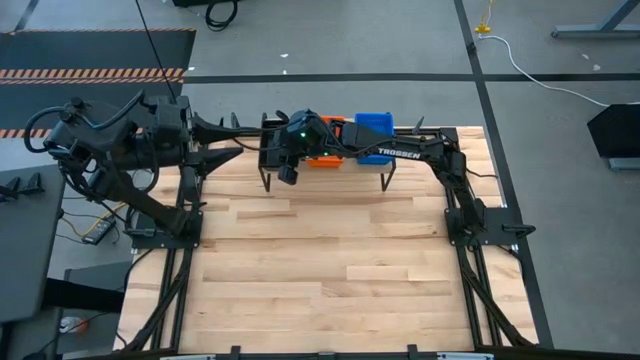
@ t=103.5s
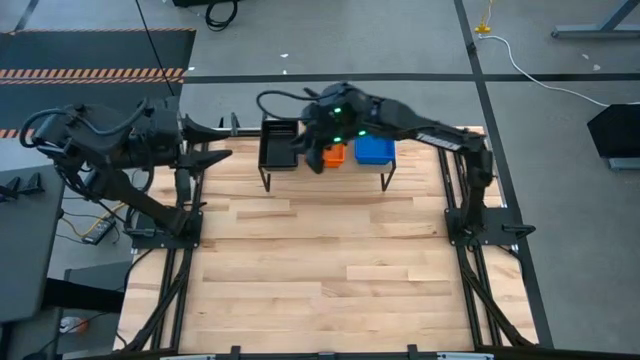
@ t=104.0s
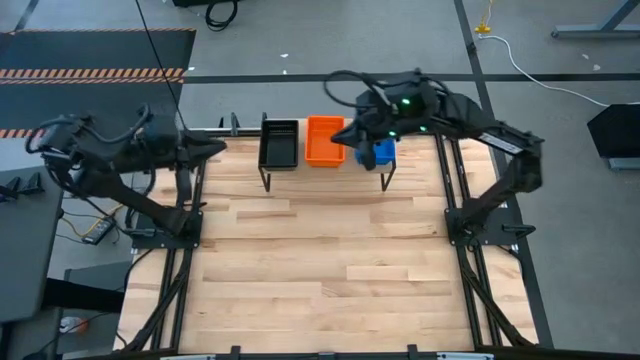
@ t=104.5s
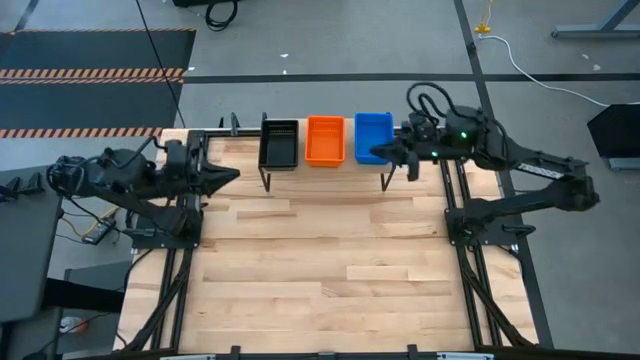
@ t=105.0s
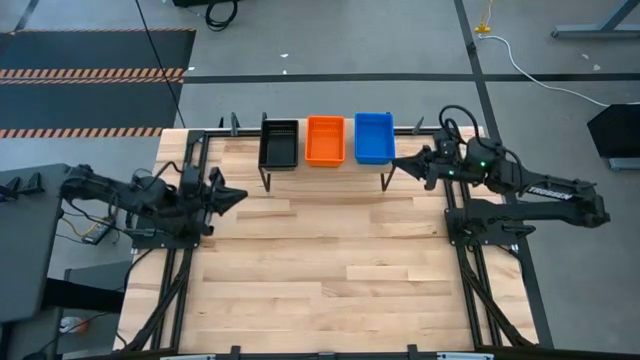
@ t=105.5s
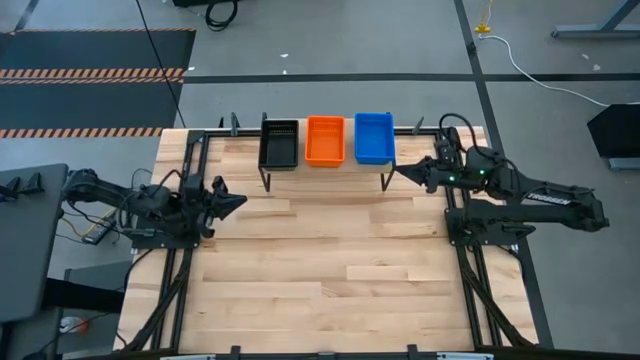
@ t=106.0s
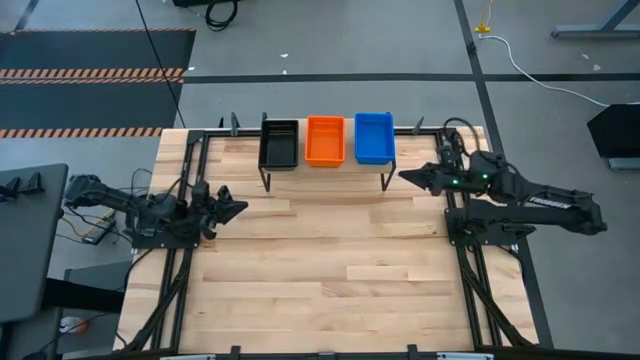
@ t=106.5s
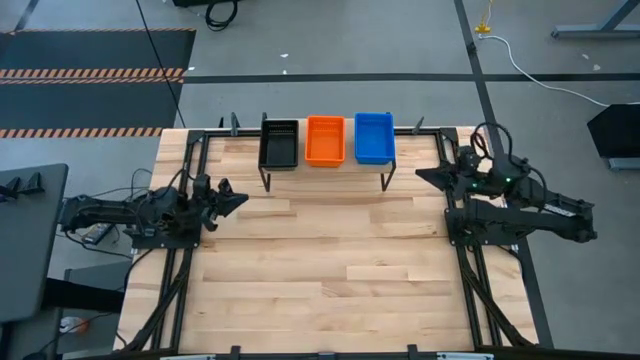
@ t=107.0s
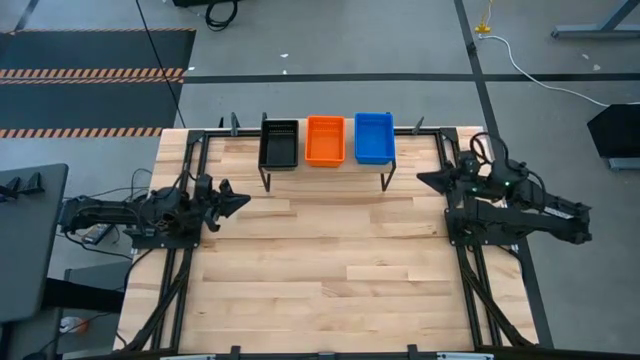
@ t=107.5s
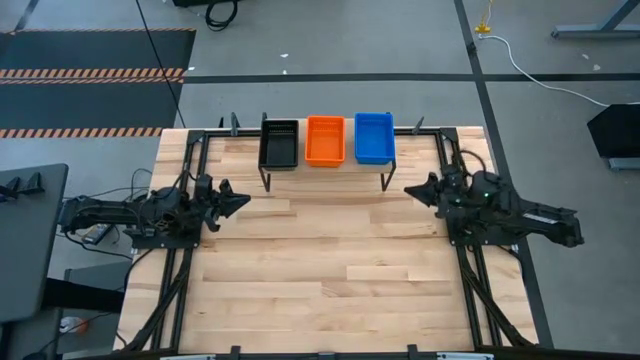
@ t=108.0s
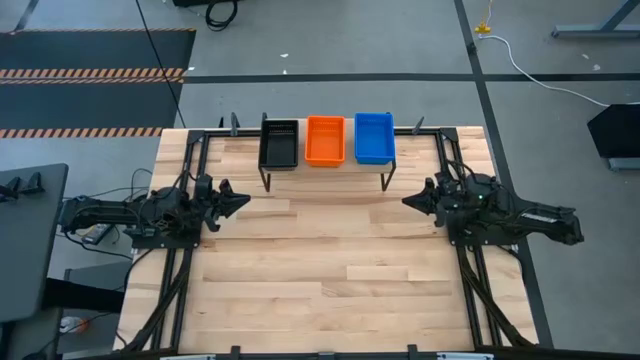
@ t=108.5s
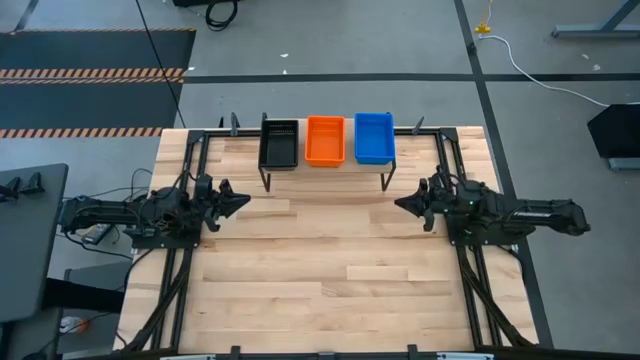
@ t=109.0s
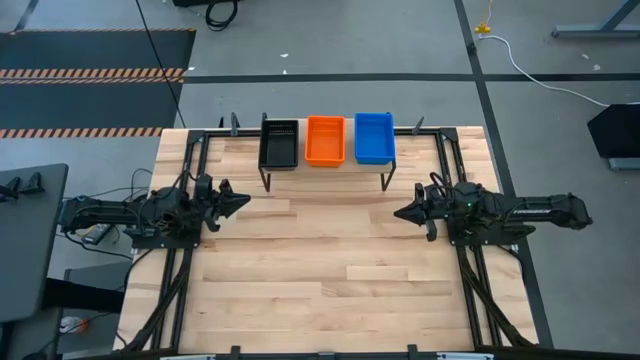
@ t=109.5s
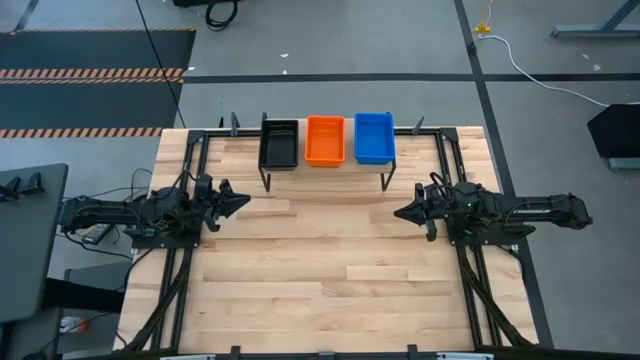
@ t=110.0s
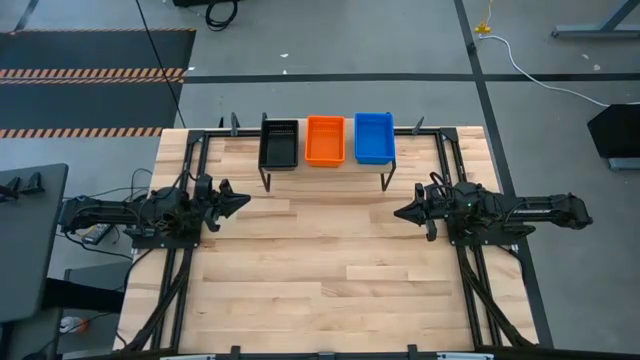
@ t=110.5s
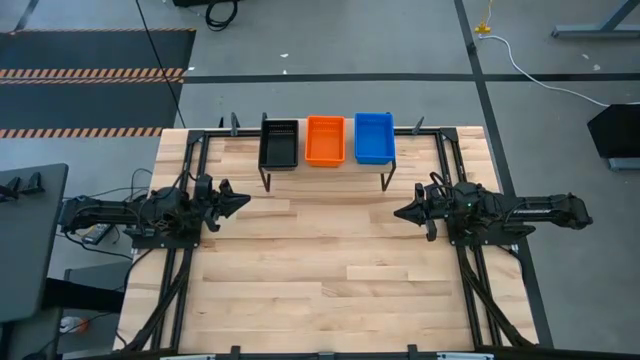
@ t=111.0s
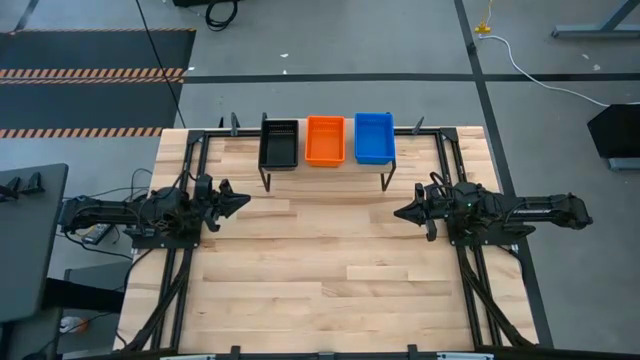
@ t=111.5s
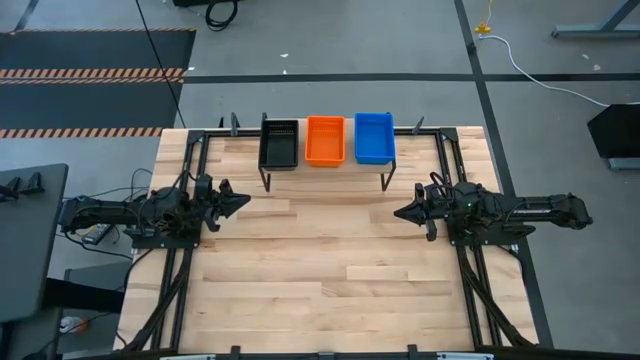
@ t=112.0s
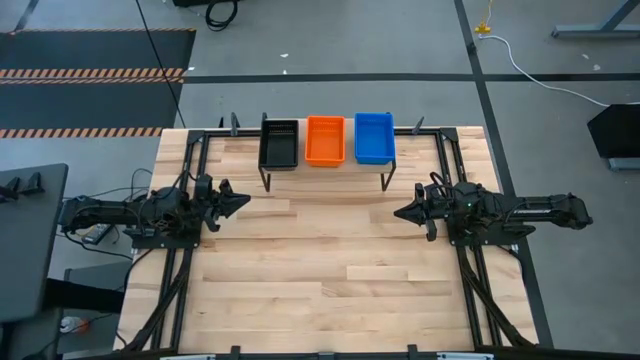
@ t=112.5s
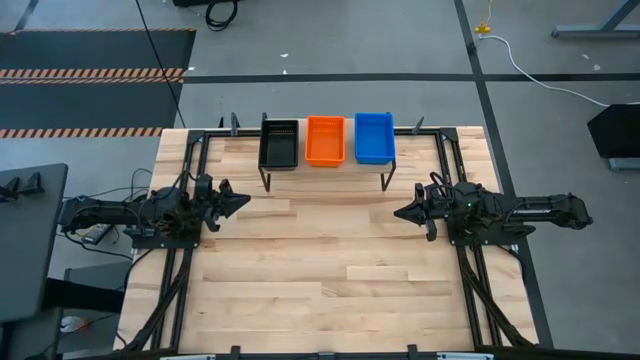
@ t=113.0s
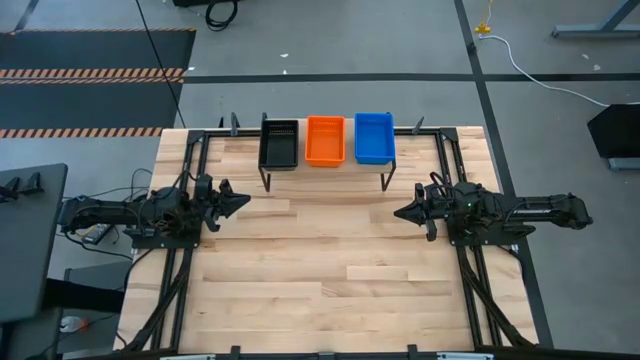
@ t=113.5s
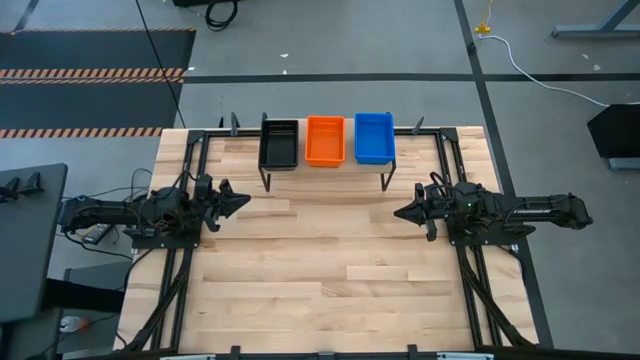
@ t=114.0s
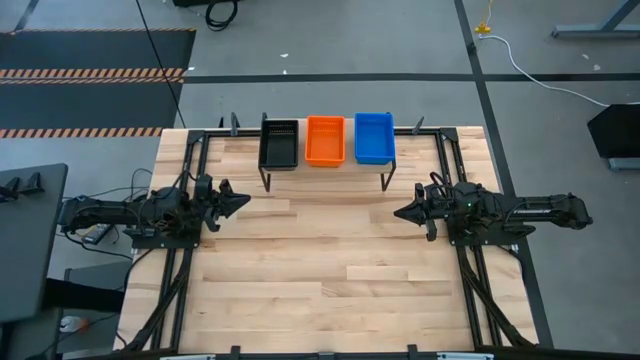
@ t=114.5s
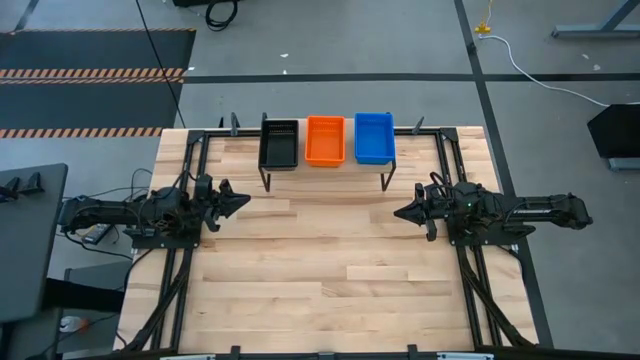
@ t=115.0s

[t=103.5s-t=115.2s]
Task: Stack baskets on shelf by color
Return to home position
